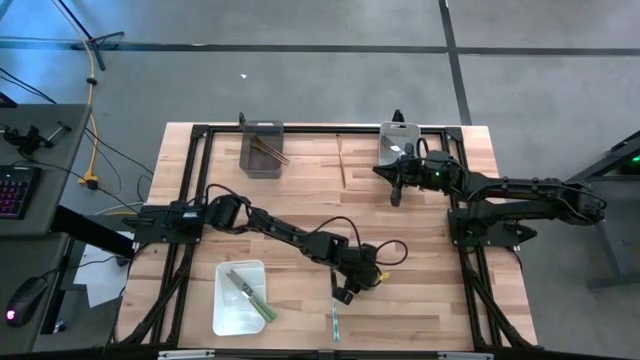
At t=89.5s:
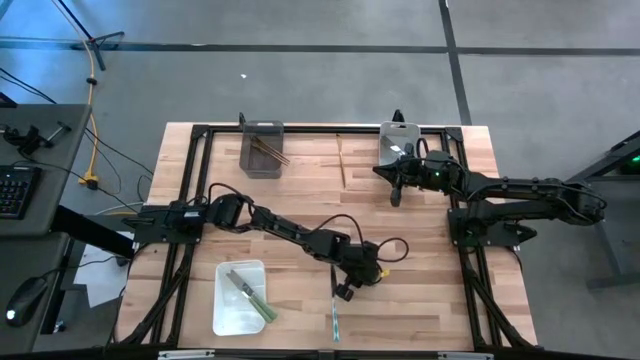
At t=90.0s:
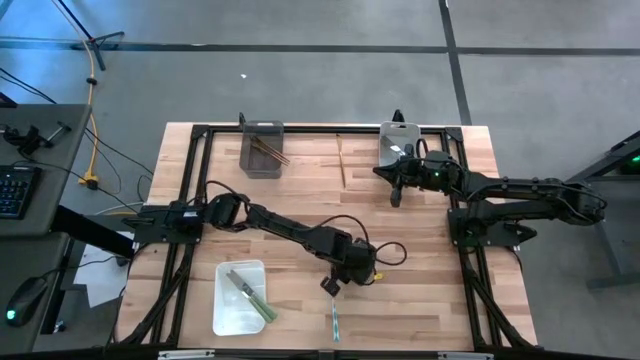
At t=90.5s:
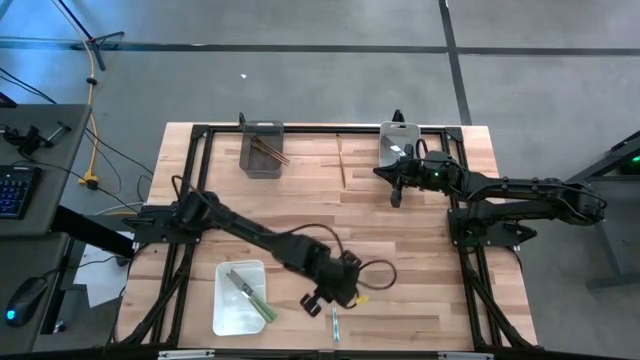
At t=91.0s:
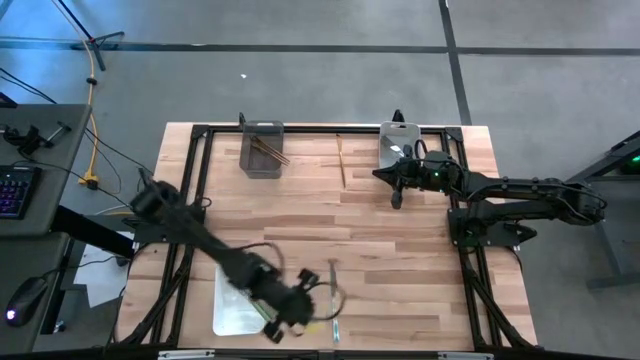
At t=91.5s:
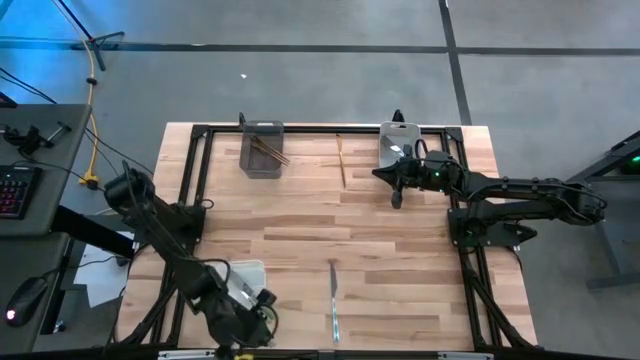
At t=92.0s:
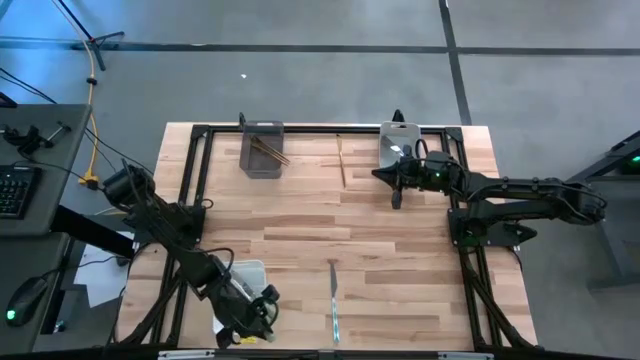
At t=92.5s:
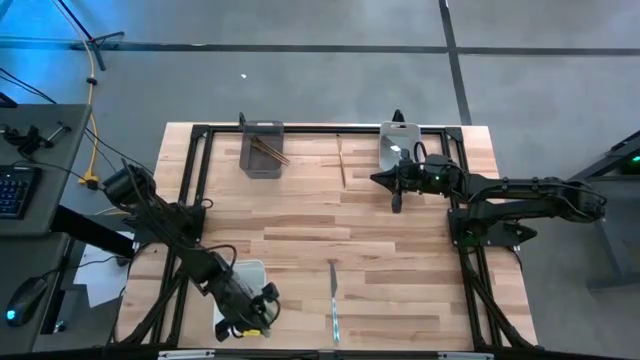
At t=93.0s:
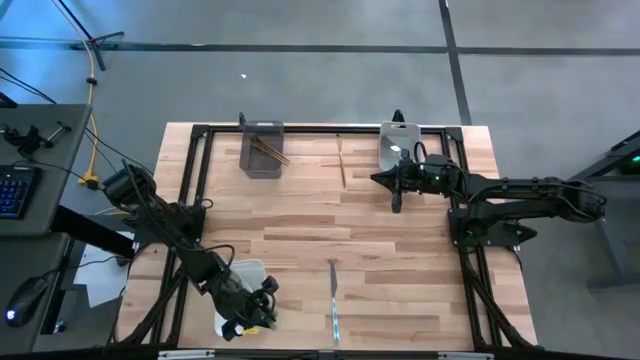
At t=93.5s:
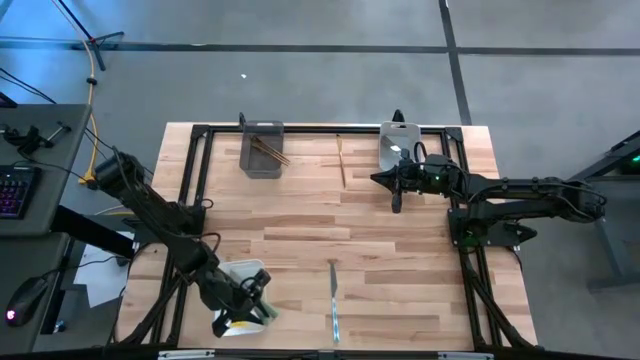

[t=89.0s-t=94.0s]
Task: Sort silverware by color (type)
Put the green table knife into the white bin

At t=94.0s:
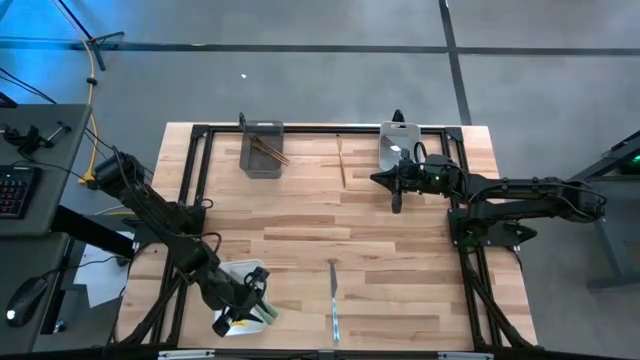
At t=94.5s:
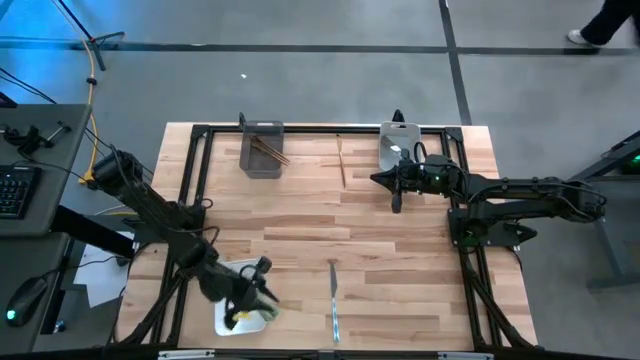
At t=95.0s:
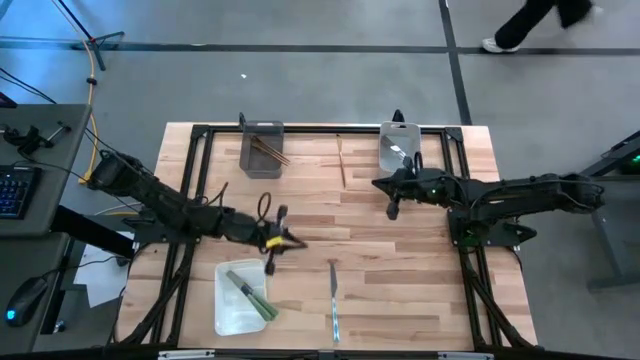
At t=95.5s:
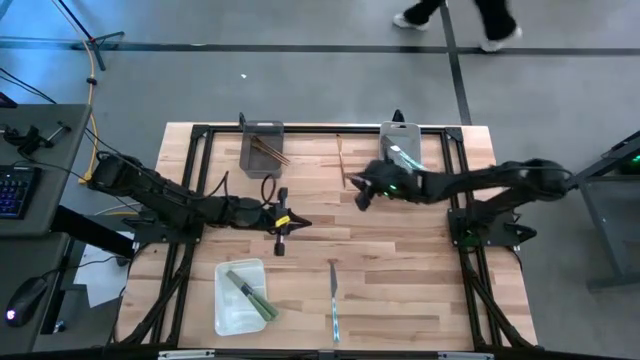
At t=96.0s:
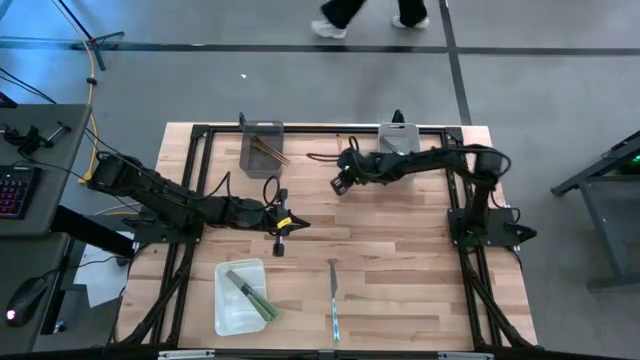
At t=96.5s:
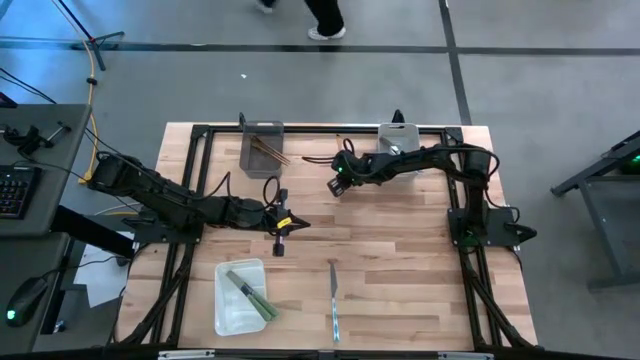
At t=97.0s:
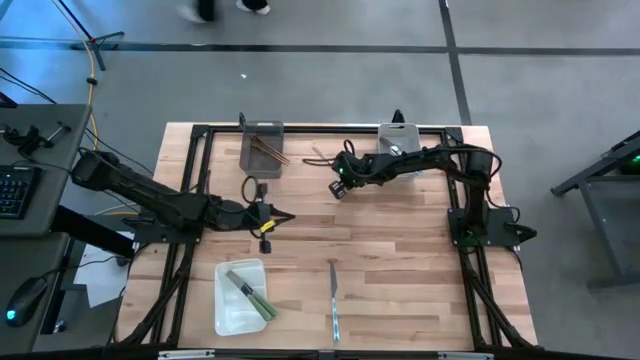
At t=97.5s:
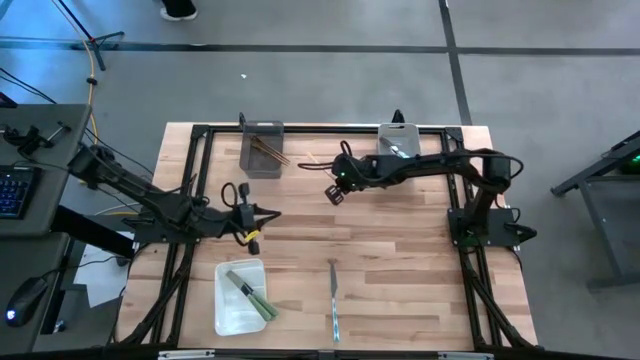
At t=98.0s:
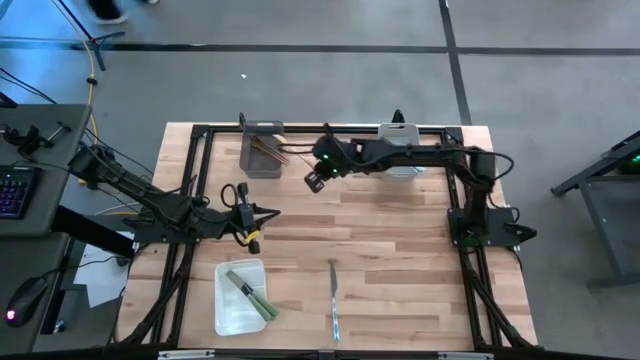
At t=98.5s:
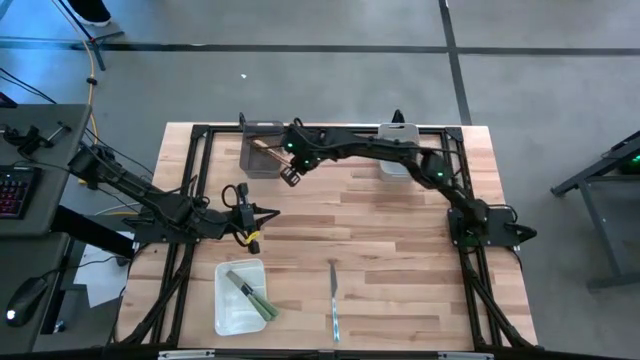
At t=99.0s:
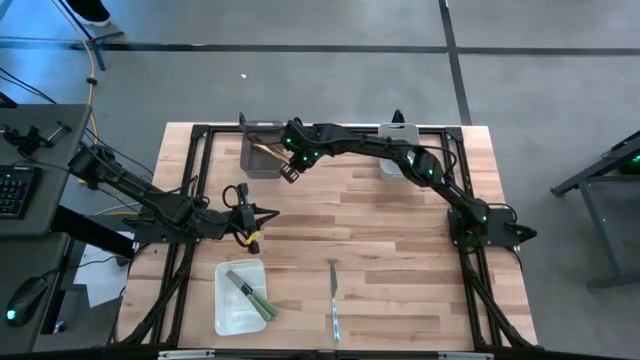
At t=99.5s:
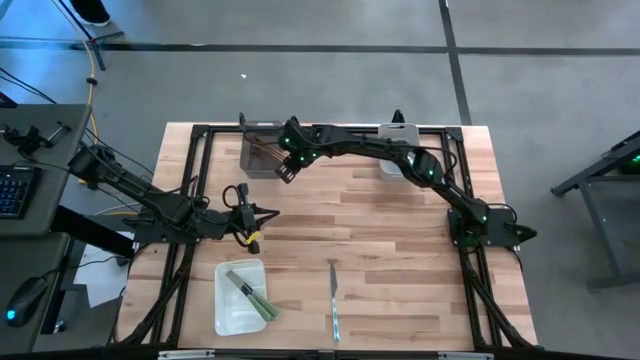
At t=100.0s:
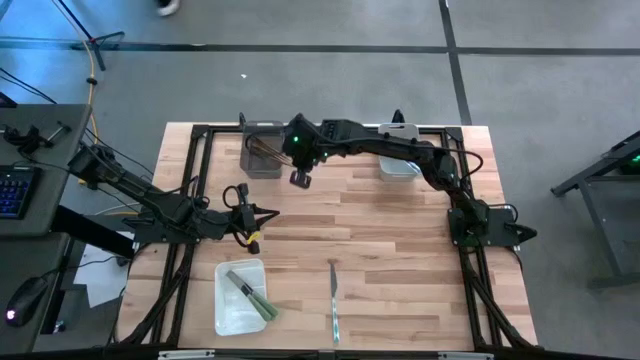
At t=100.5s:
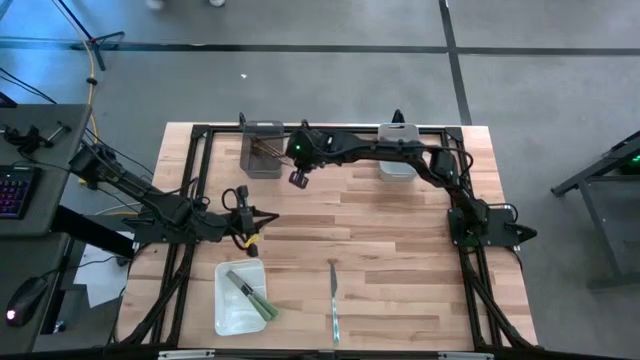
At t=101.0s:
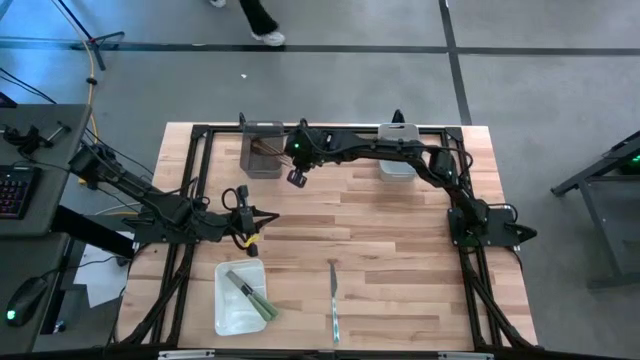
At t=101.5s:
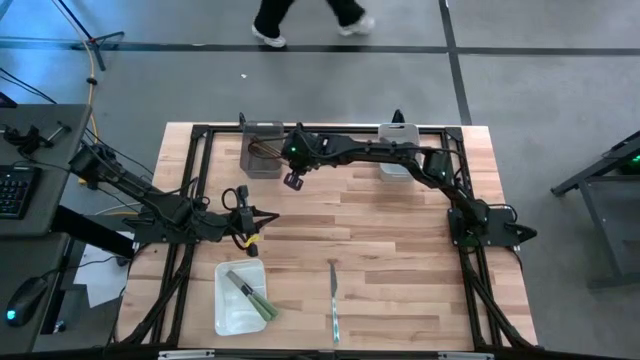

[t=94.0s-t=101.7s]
Put the gold table knife into the black bin

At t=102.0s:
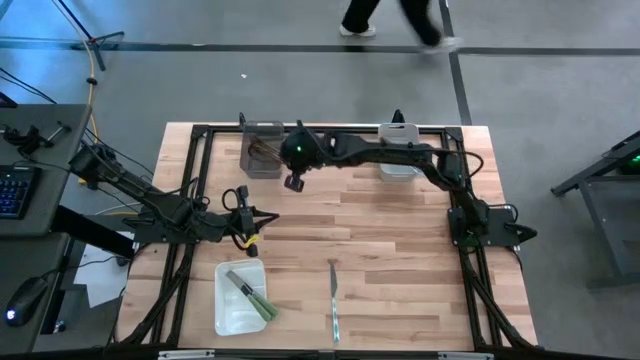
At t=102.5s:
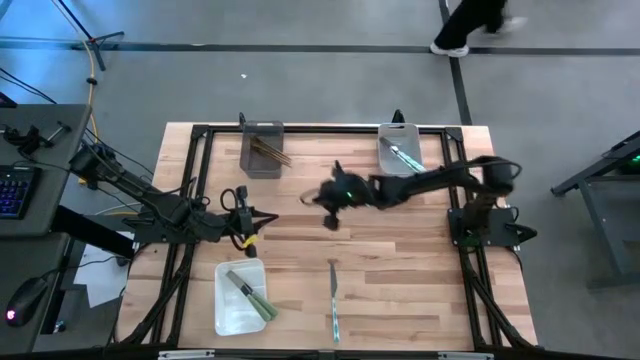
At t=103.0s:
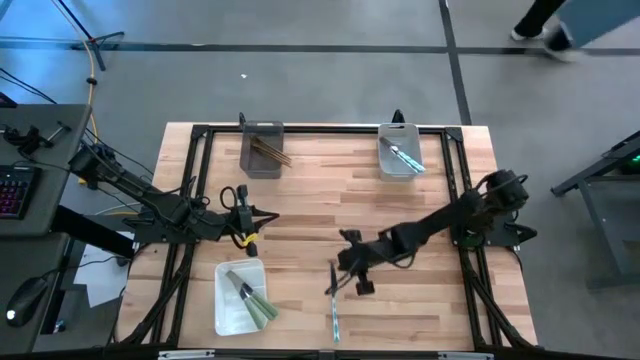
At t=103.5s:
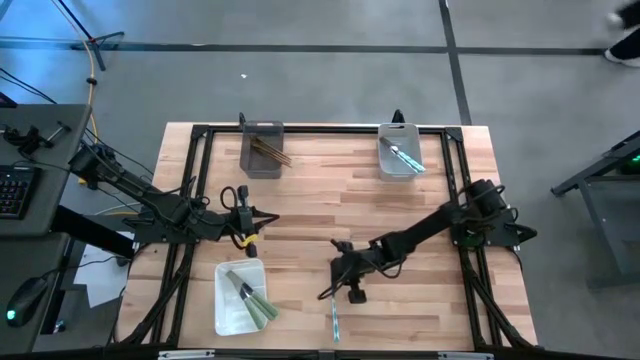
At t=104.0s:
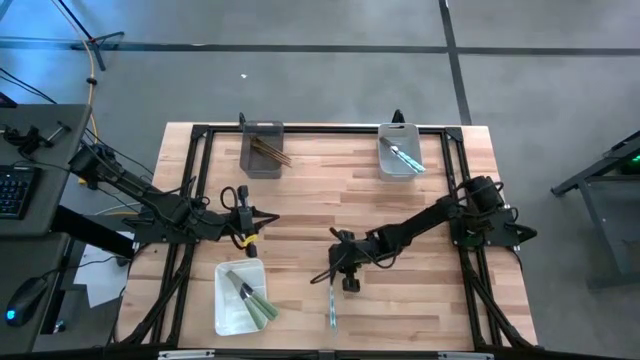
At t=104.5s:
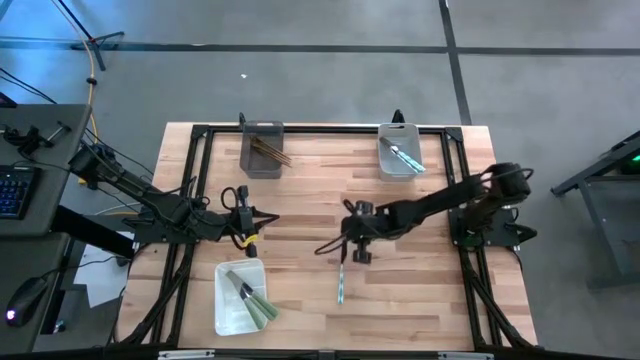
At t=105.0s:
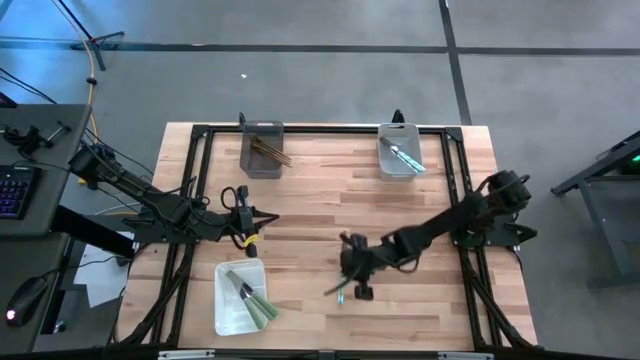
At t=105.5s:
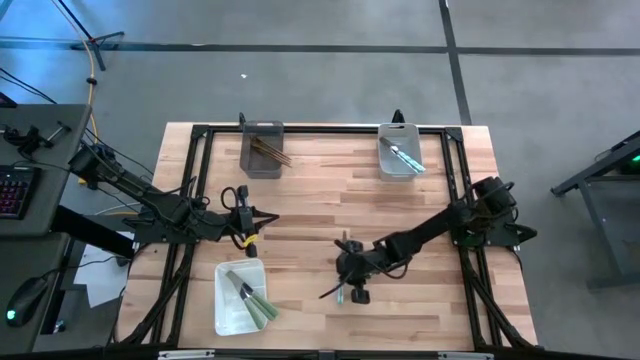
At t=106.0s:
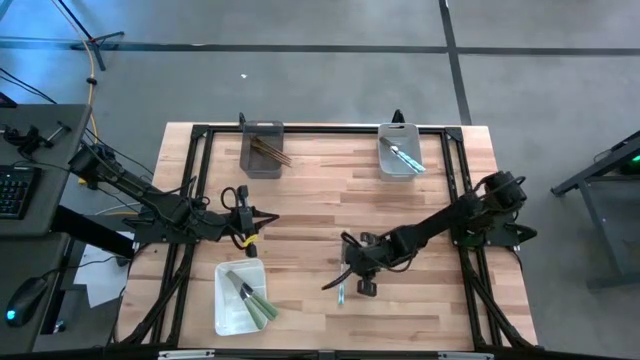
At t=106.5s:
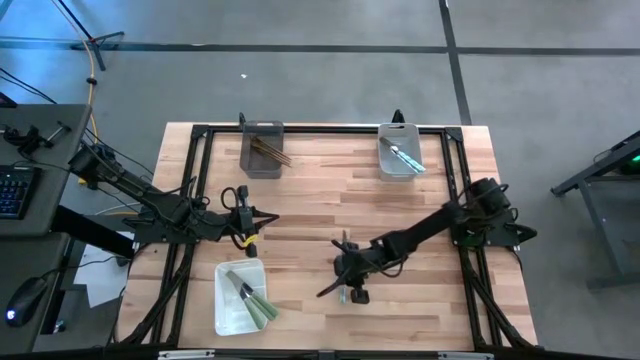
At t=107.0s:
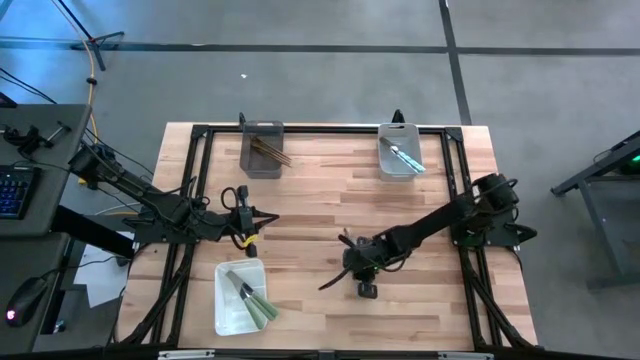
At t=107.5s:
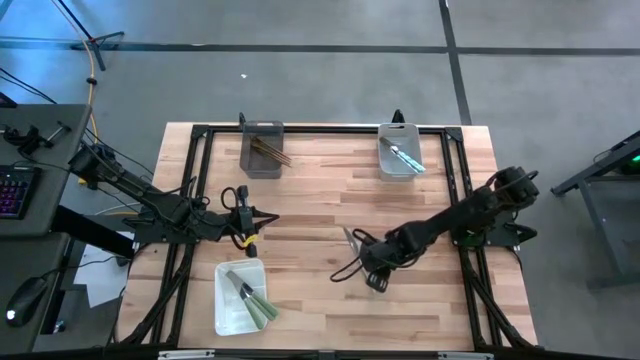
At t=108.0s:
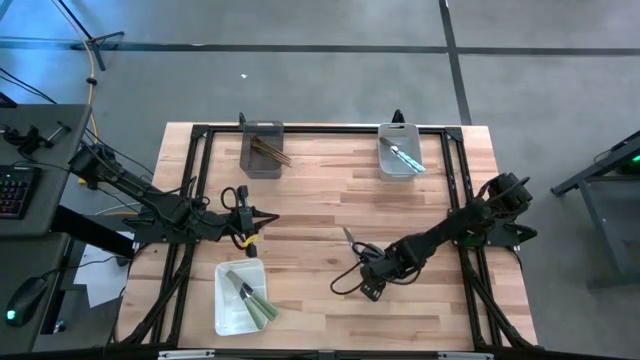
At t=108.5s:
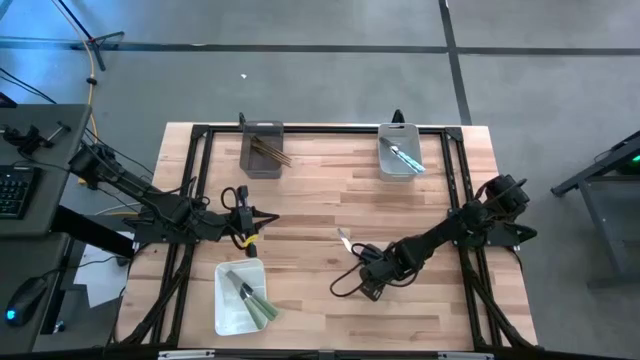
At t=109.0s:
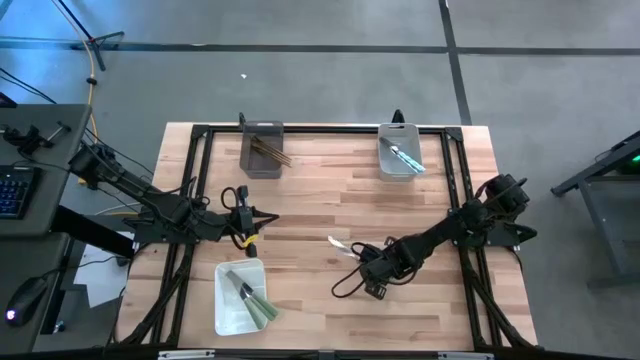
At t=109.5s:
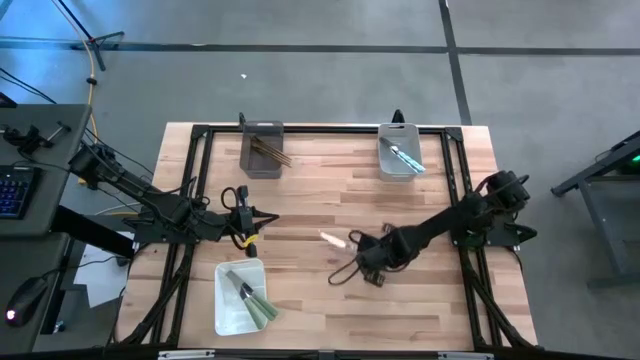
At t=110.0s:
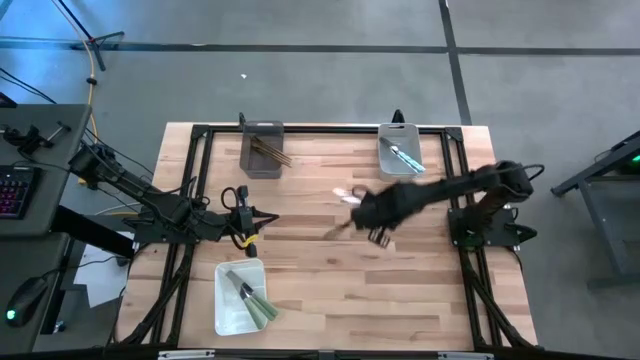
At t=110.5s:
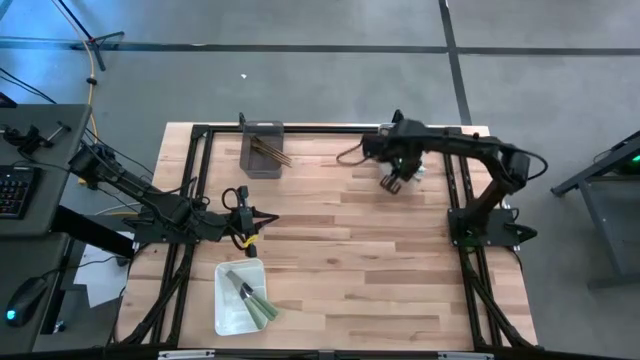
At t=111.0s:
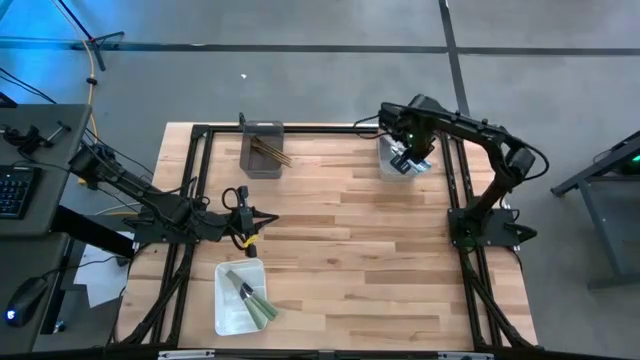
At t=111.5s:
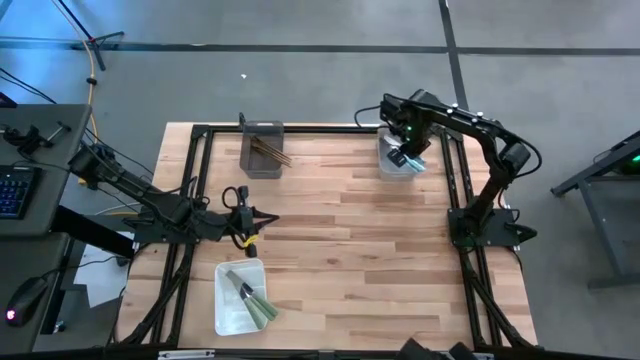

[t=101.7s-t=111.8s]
Put the blue table knife into the gray bin
